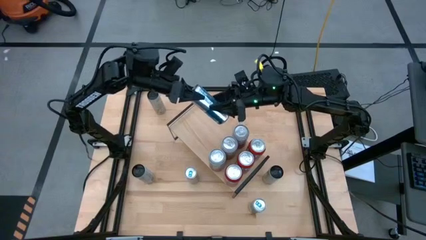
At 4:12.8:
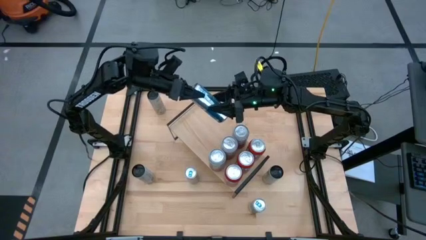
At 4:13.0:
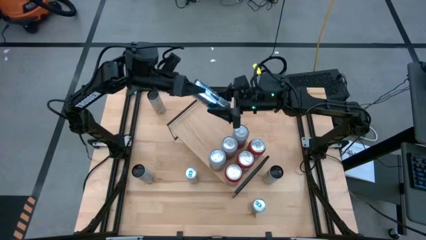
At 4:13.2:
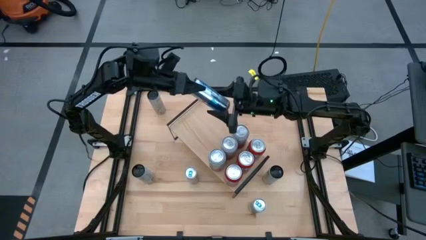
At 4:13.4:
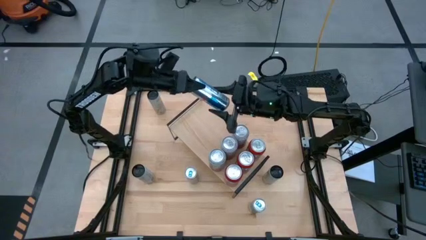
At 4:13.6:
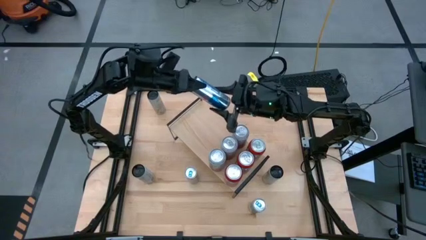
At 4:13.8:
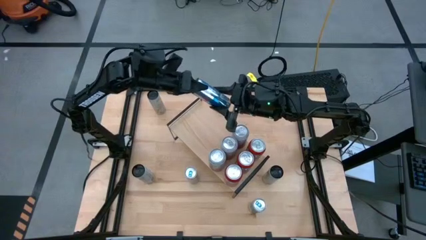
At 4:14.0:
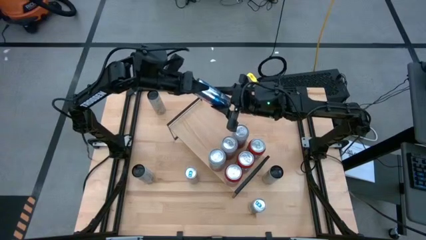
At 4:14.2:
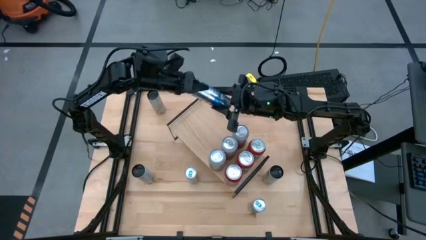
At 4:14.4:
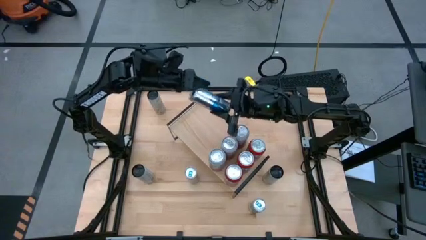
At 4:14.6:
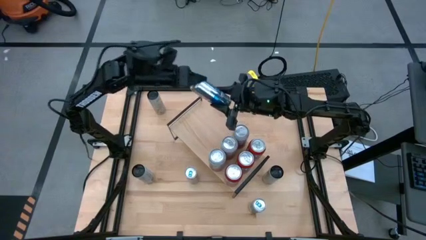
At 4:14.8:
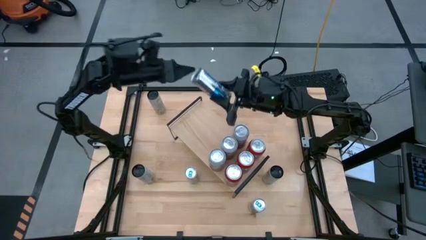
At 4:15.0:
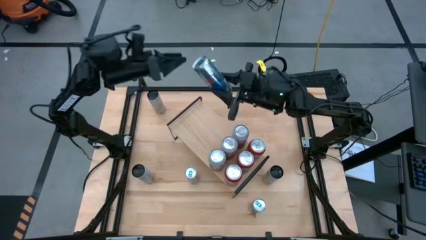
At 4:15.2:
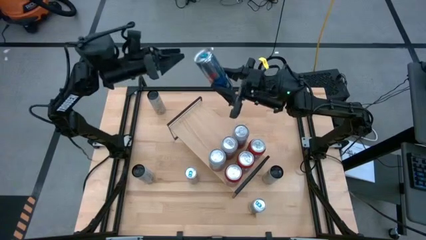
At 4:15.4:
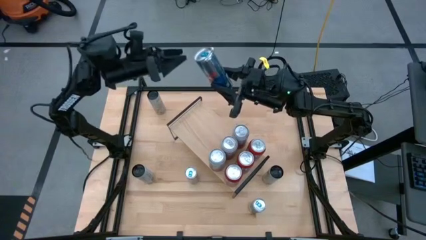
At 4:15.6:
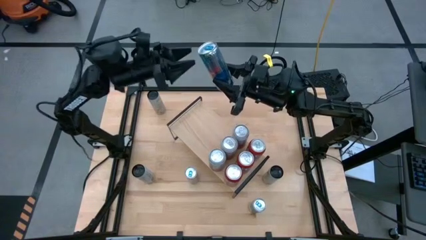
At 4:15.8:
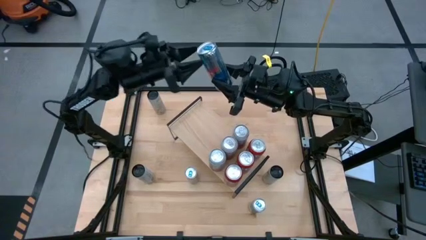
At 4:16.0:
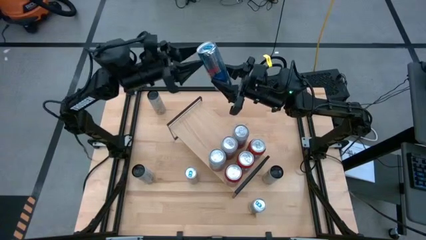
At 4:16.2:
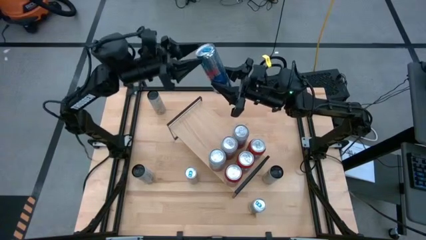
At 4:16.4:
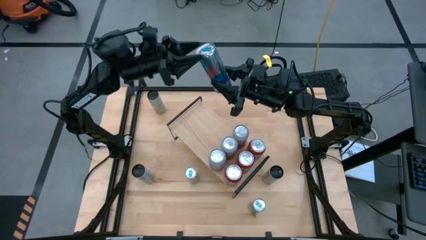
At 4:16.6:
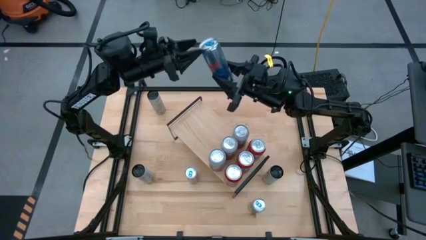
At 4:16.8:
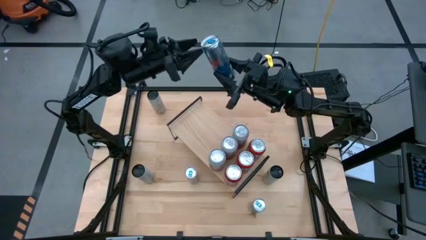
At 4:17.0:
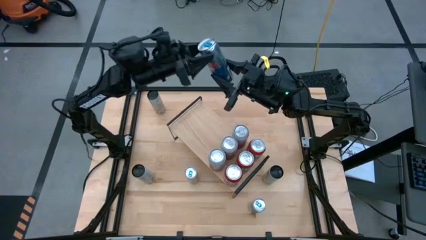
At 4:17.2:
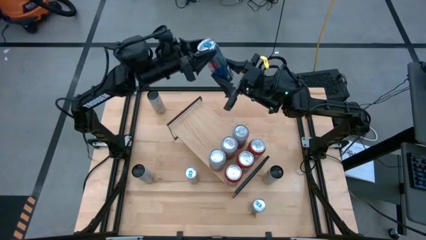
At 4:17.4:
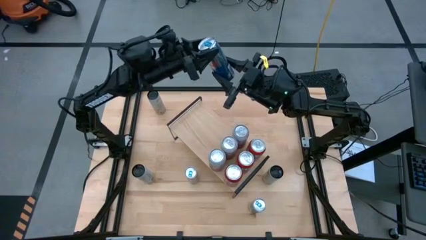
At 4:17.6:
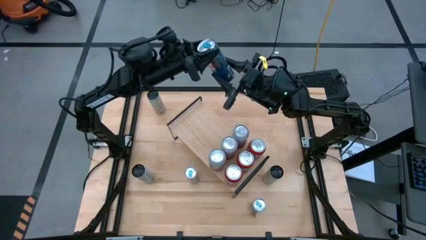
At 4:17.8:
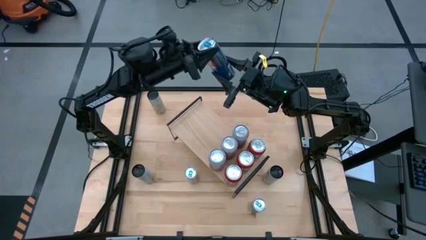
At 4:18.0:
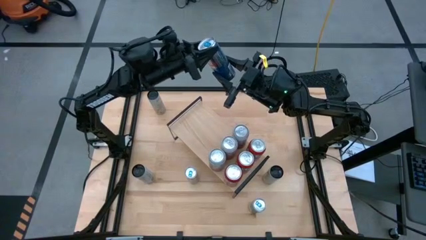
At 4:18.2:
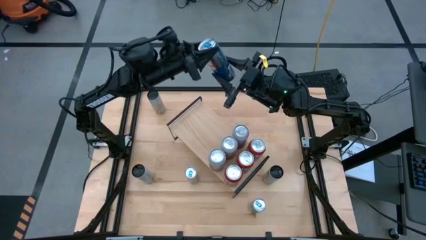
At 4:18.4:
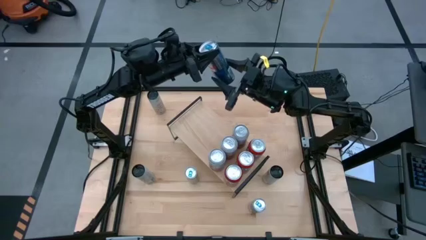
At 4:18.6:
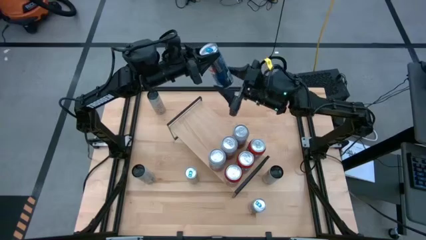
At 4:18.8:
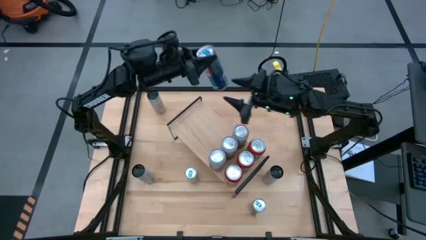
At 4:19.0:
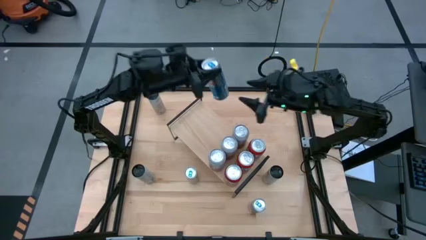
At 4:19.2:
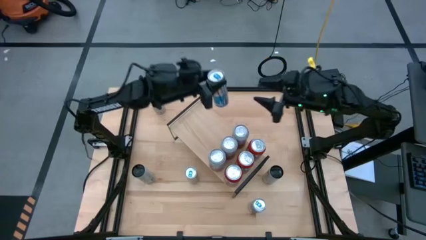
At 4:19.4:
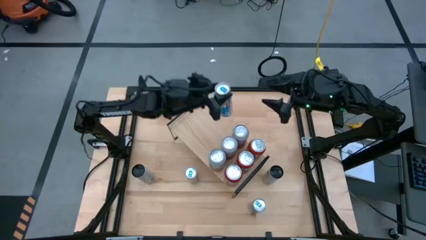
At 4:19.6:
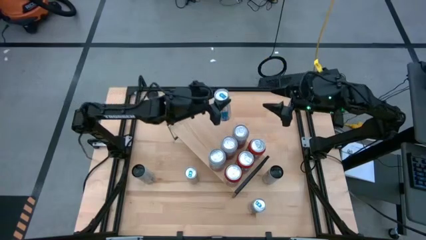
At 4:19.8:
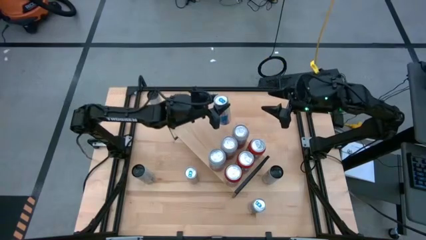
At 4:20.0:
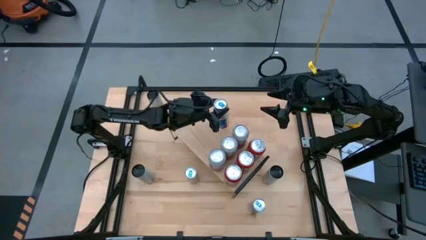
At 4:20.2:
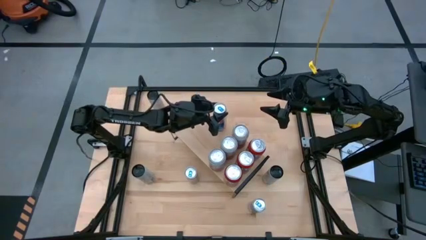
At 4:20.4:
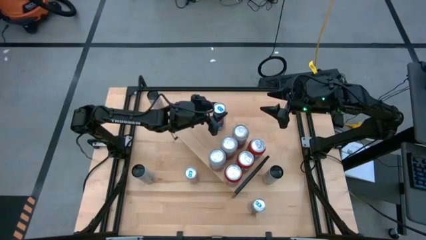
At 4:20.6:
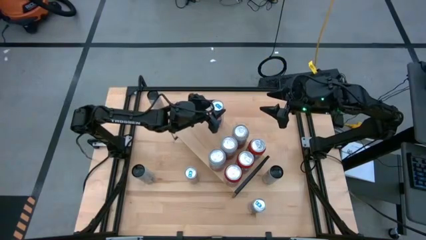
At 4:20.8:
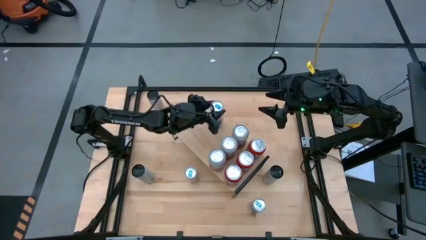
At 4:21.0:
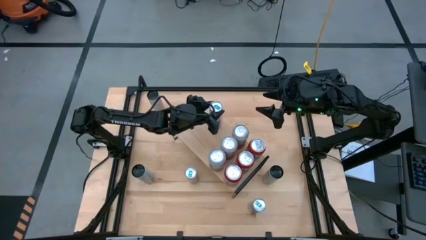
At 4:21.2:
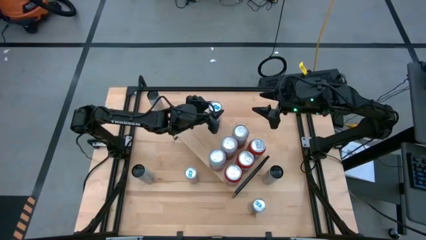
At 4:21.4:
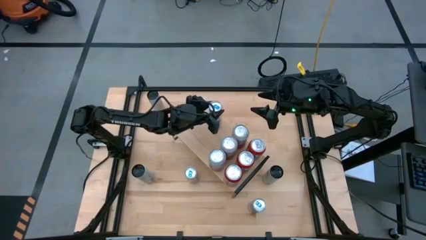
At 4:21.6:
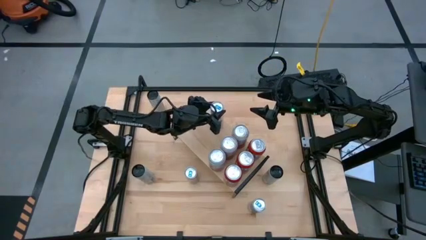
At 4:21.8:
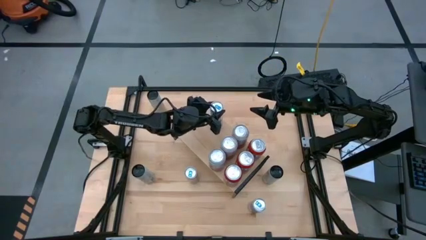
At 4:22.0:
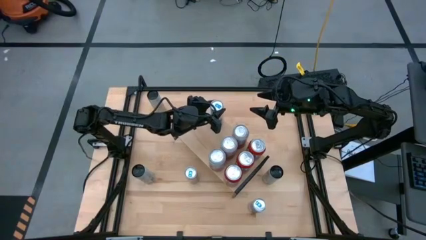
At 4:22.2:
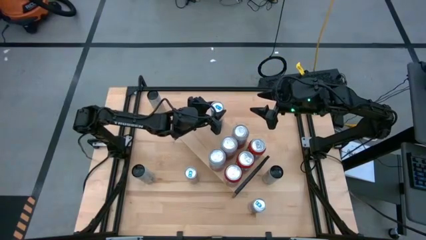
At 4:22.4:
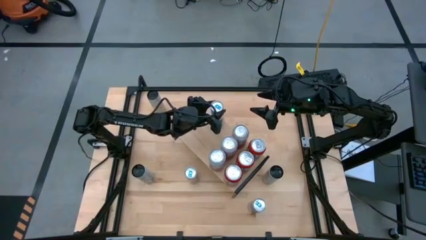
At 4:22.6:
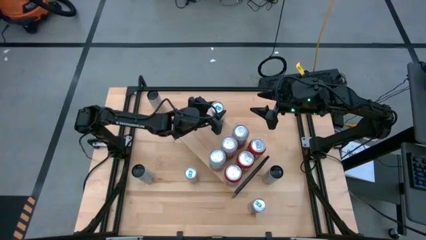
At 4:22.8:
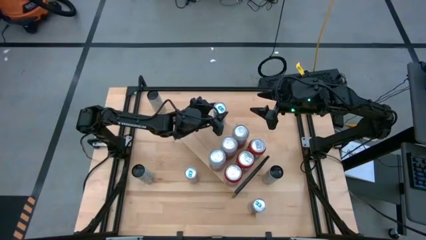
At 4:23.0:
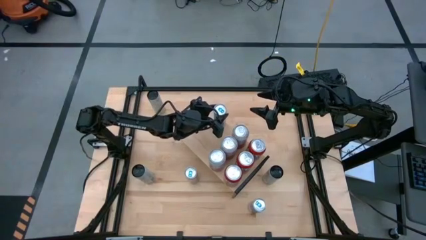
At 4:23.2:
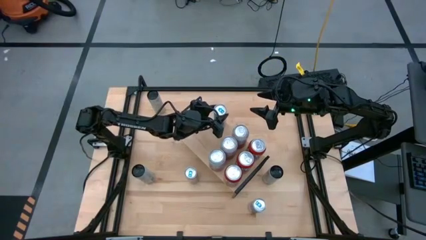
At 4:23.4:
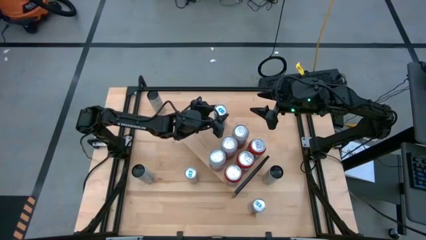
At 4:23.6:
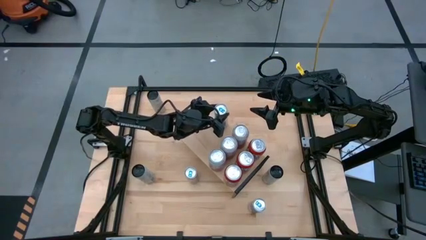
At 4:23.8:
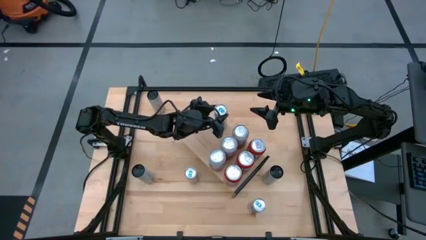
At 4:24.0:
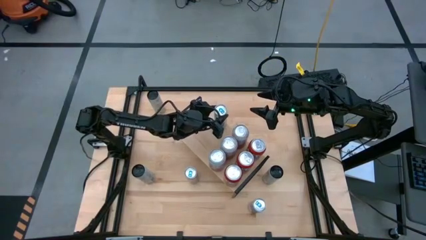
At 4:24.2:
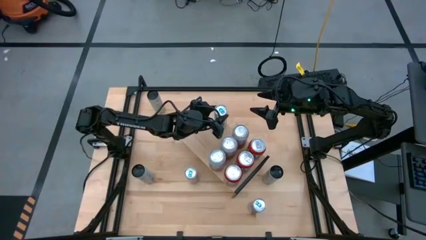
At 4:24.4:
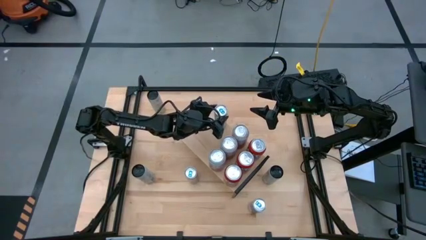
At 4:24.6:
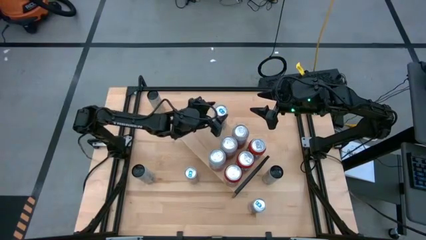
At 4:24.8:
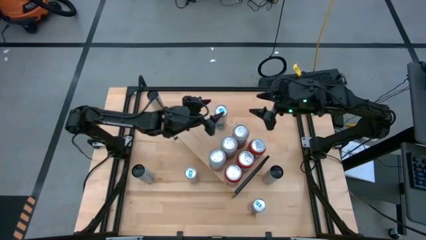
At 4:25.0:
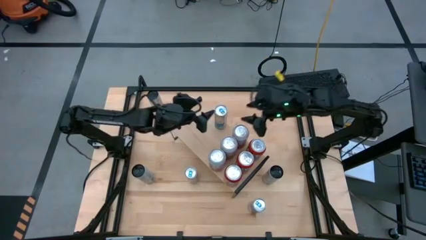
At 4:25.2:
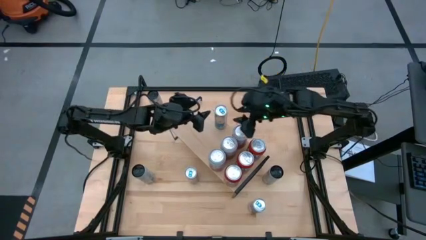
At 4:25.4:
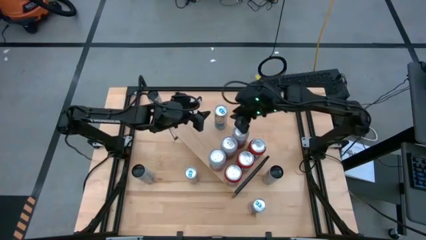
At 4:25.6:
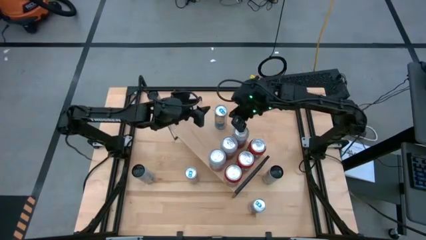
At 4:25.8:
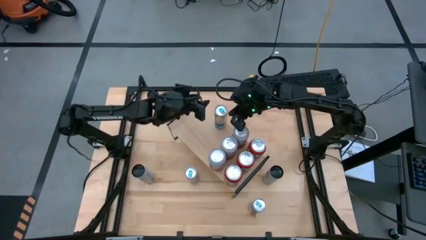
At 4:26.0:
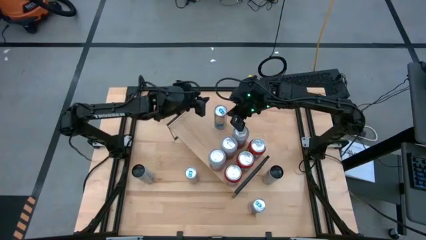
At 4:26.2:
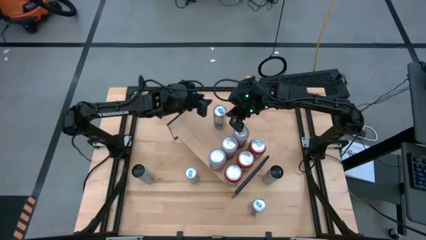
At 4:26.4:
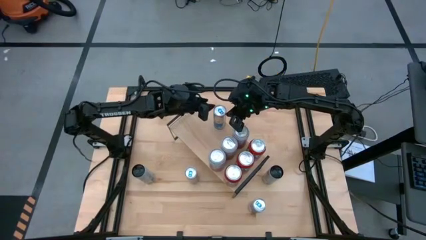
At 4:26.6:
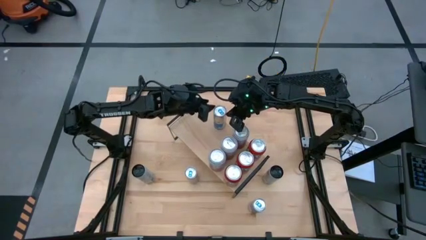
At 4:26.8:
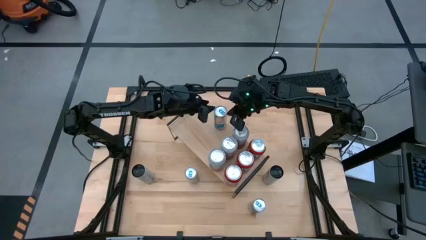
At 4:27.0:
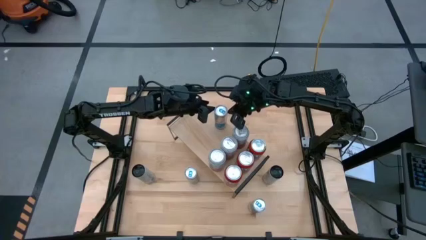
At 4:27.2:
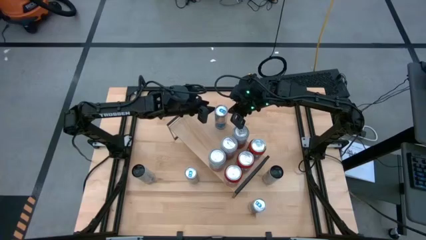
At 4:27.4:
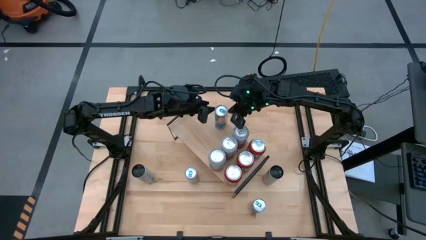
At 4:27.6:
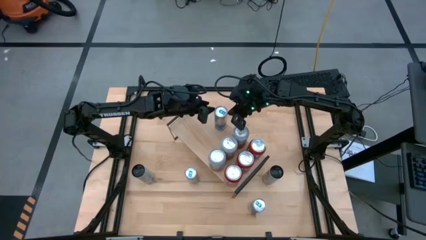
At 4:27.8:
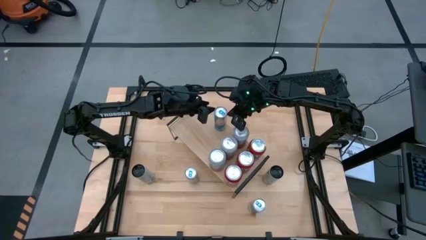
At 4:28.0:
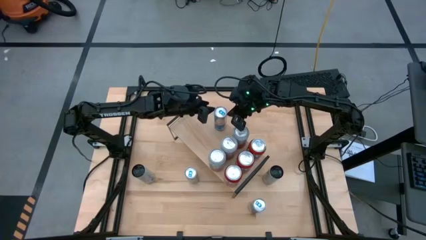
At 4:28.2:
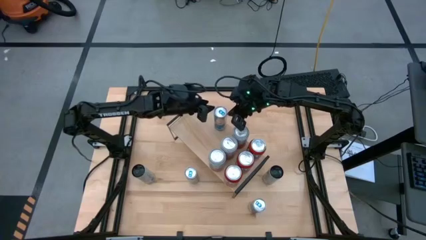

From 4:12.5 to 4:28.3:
Task: Place canned beverage on shelf
Put the top blue soda can on the shelf

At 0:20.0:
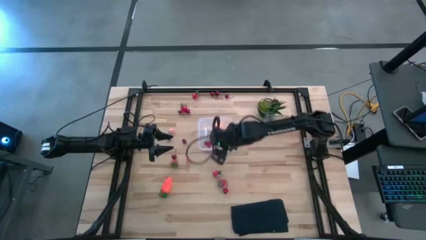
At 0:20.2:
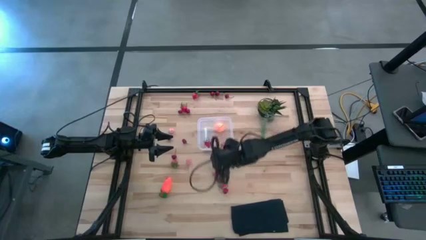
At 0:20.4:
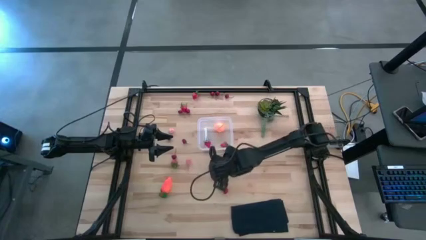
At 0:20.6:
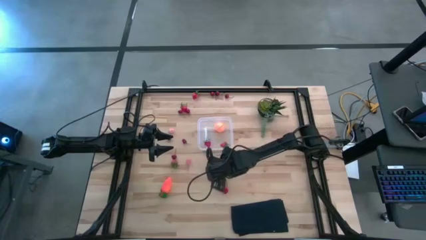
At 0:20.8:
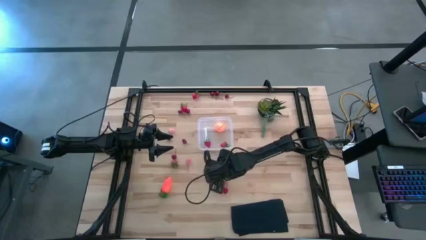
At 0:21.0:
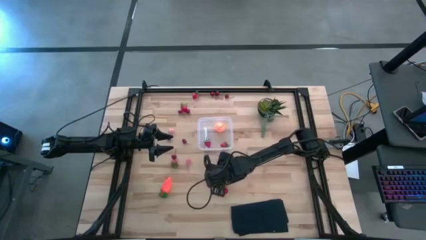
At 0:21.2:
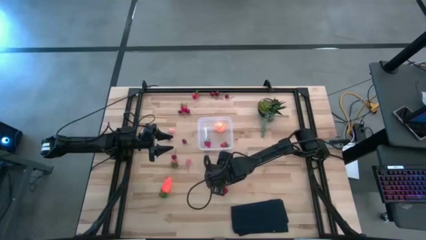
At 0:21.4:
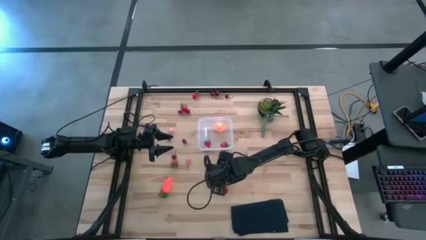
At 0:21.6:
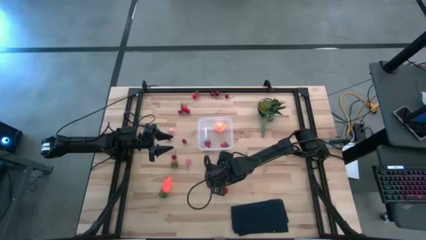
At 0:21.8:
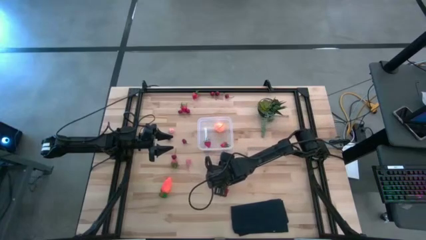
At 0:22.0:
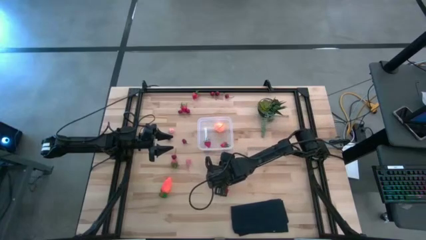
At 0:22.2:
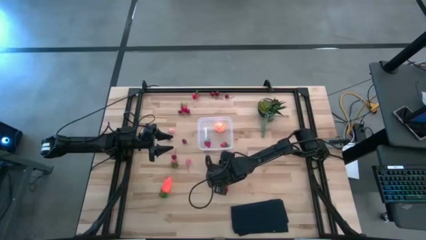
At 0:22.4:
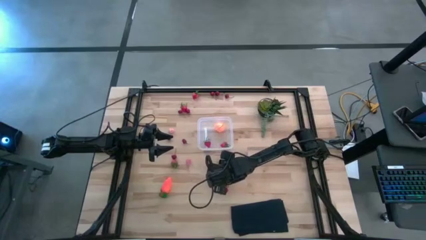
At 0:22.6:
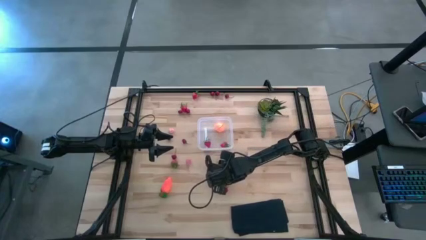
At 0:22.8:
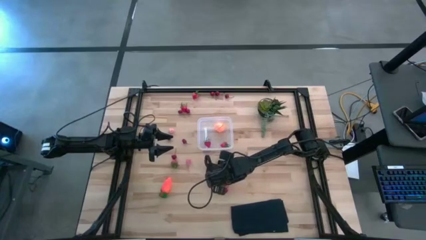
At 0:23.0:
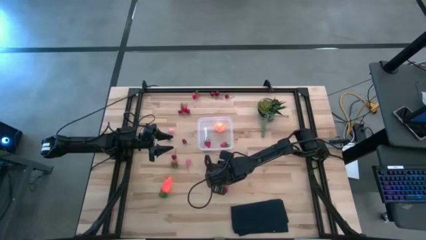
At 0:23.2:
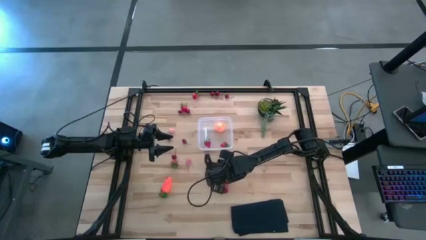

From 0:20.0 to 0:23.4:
Task: Pick and placing Produce into tupperware
Put the strawberry into the transparent bin
